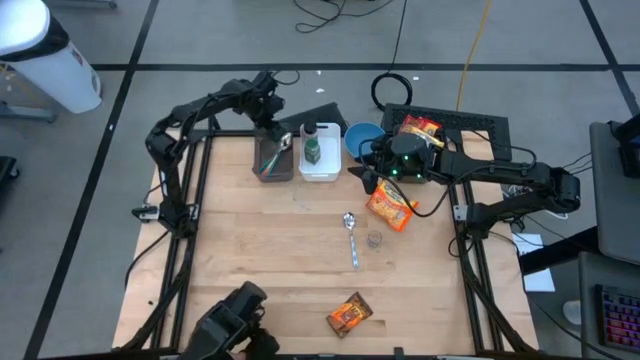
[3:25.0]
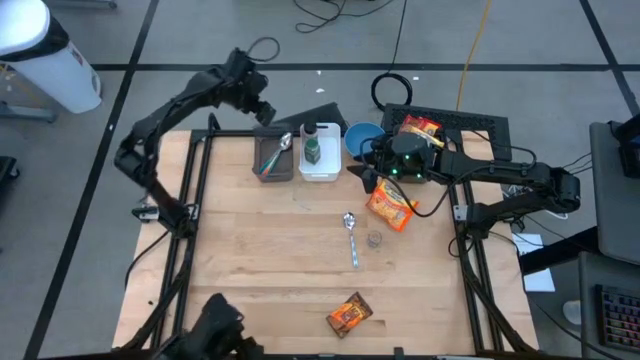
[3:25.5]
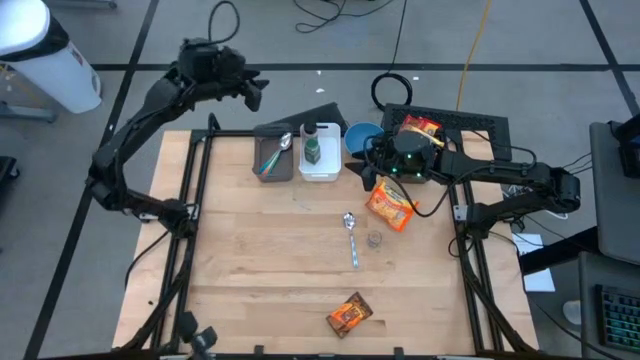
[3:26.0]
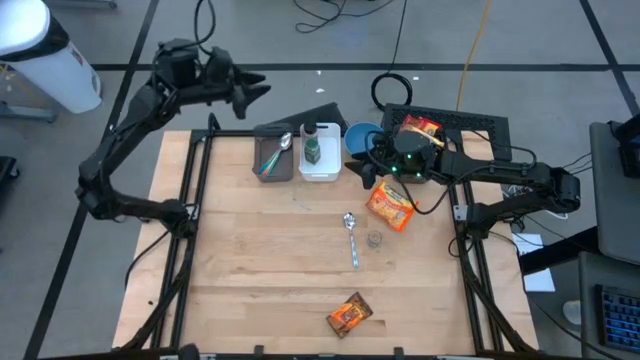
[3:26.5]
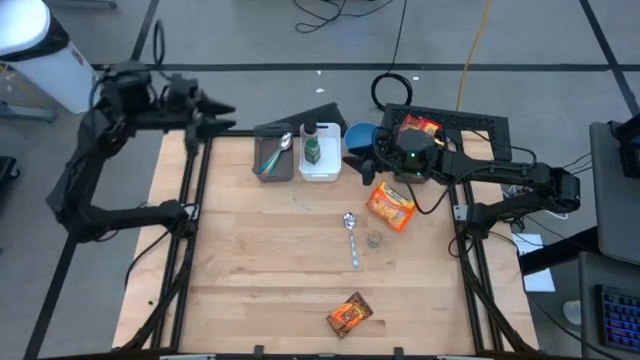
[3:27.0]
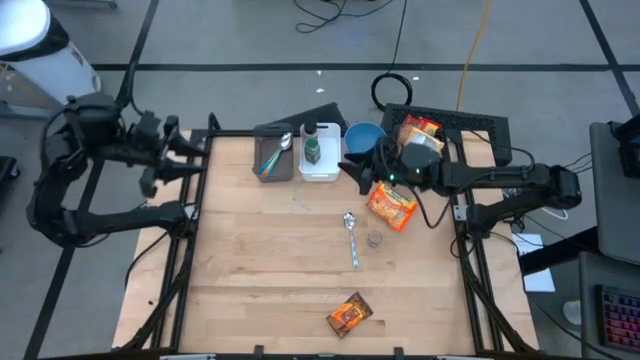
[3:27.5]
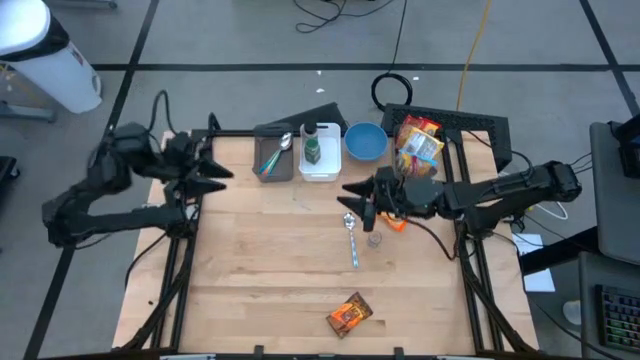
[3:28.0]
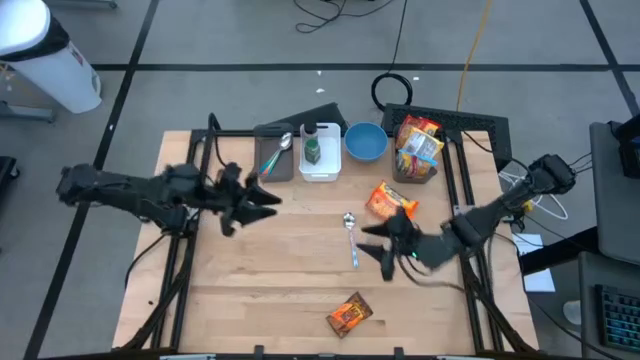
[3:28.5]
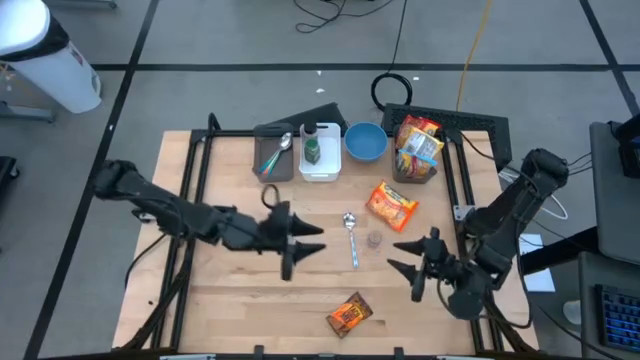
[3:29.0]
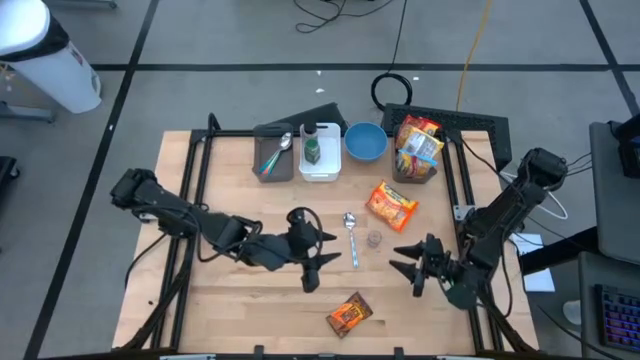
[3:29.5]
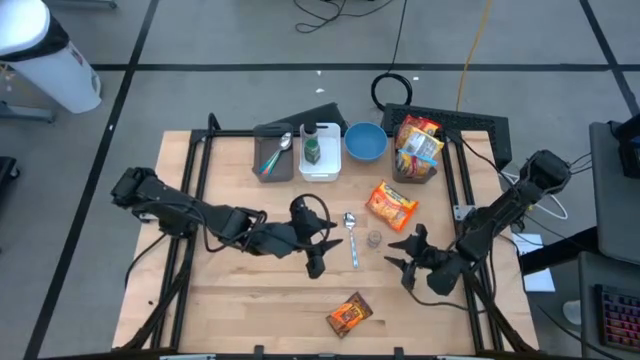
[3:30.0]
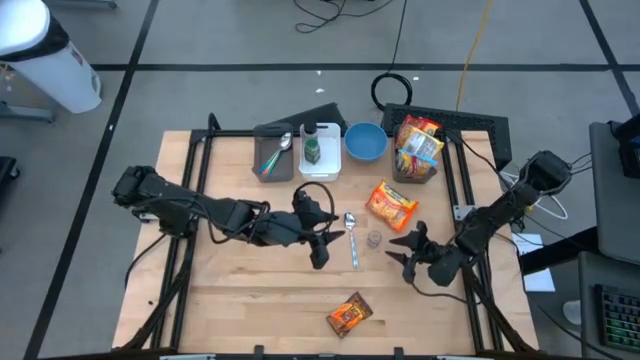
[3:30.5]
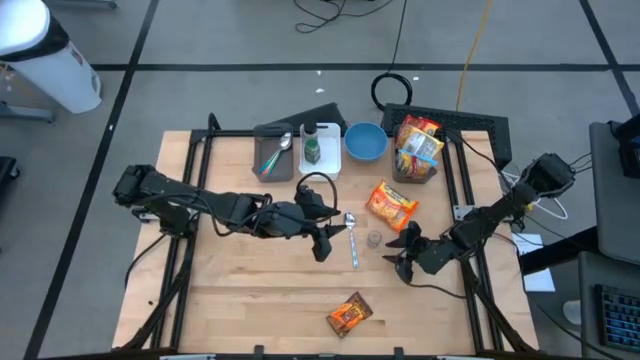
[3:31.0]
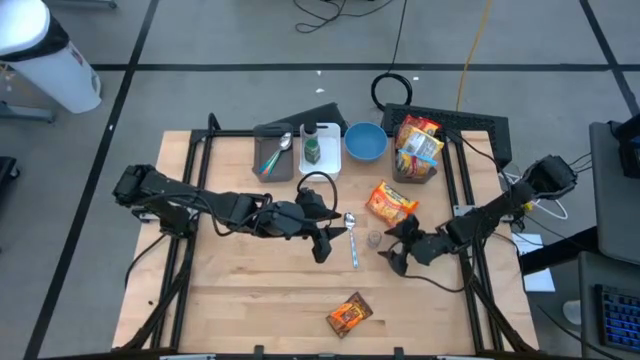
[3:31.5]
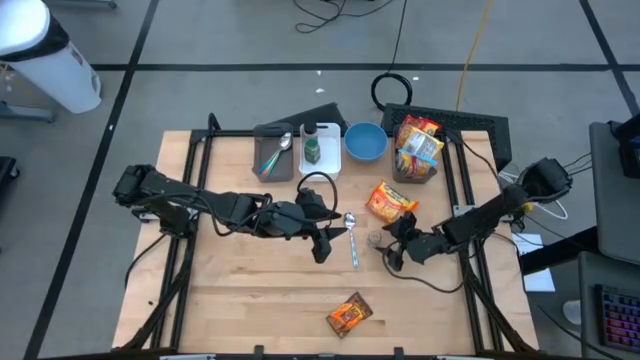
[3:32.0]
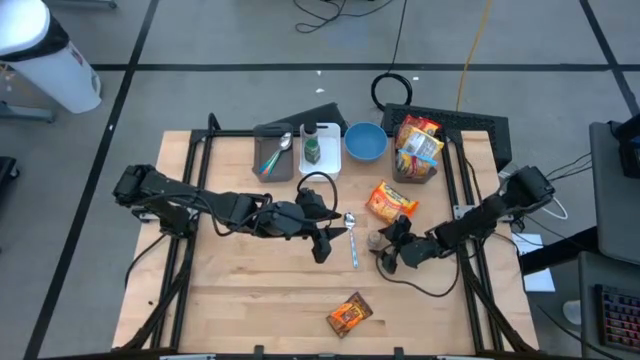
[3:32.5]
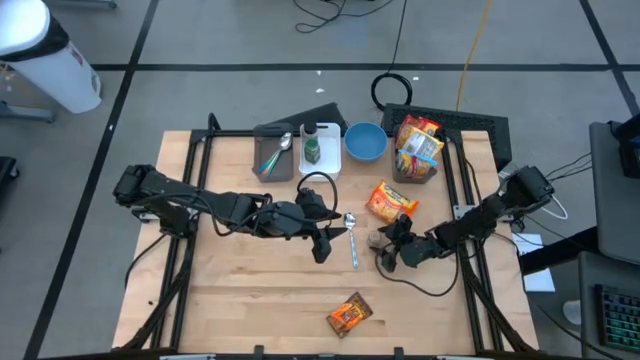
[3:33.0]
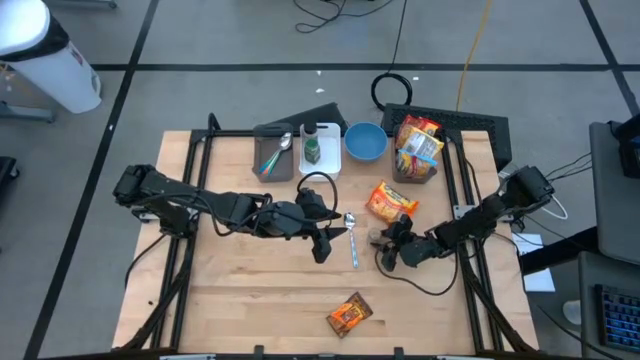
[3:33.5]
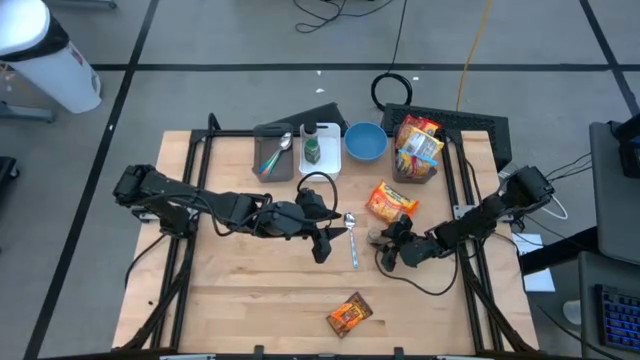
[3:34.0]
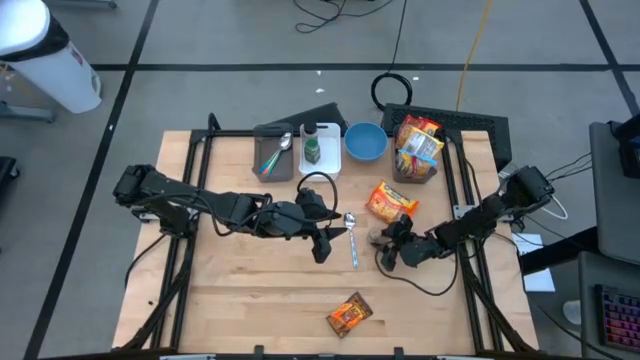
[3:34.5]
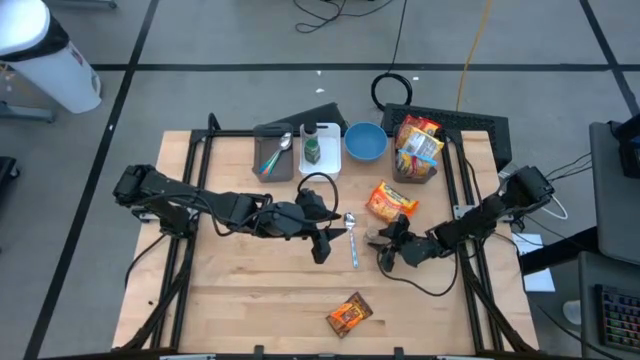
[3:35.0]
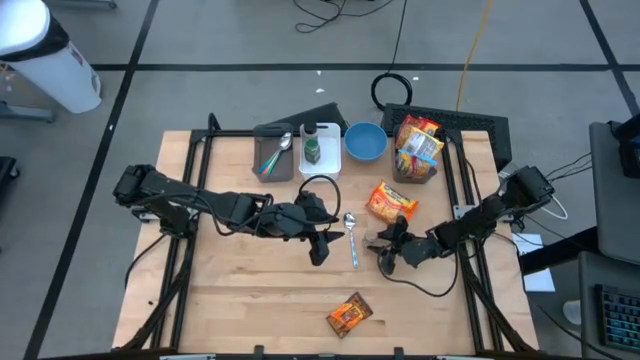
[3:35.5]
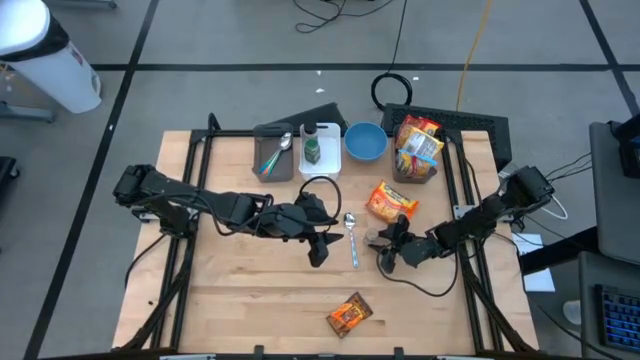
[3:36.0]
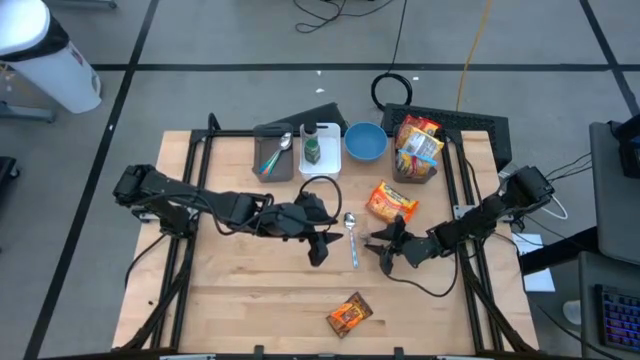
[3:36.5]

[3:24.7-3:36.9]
Task: Pick & Place Food Item
Put the brown seasoning bottle into the white bin

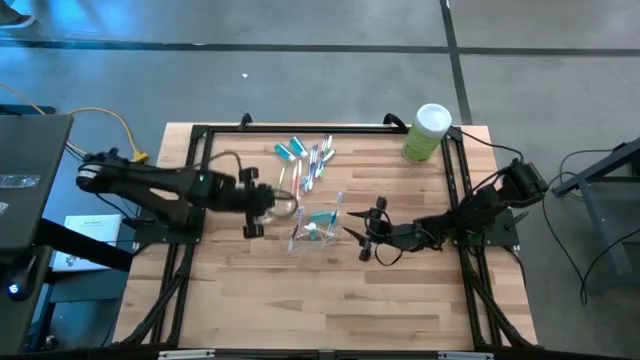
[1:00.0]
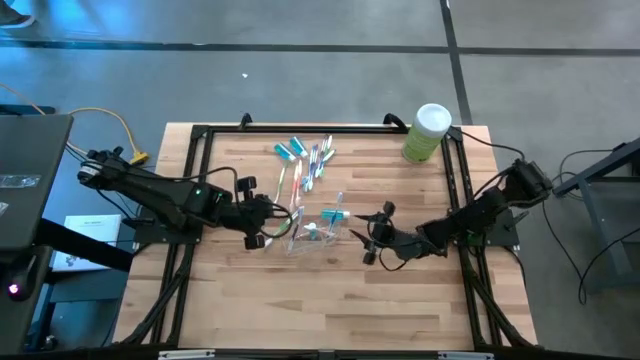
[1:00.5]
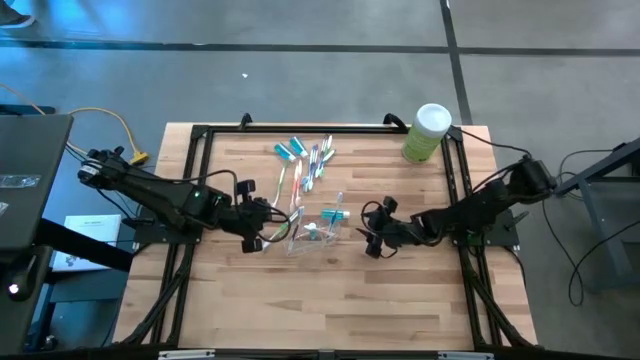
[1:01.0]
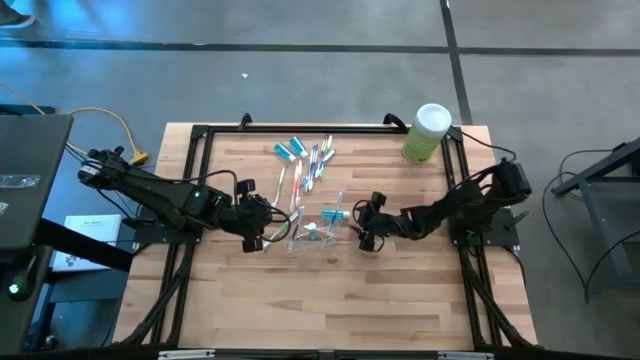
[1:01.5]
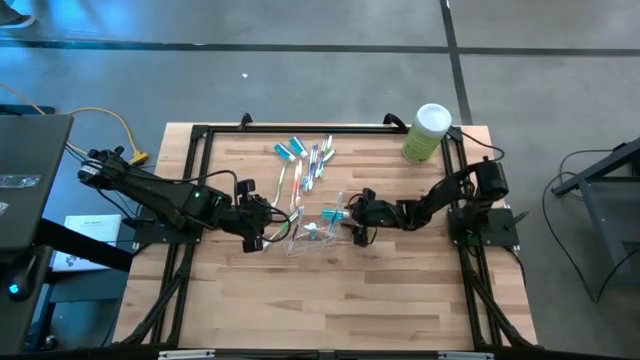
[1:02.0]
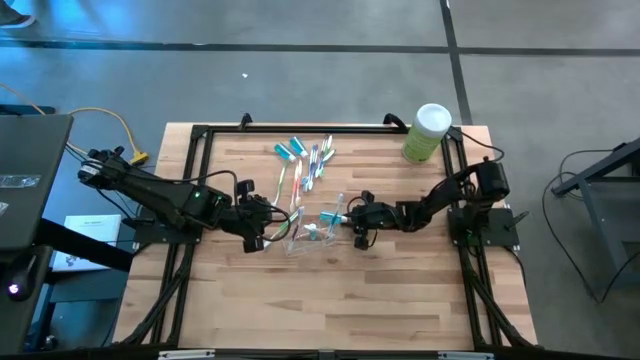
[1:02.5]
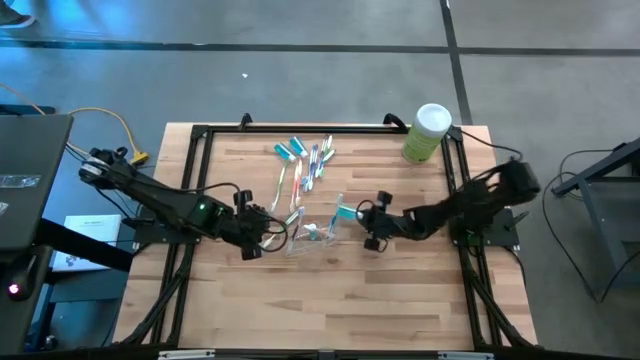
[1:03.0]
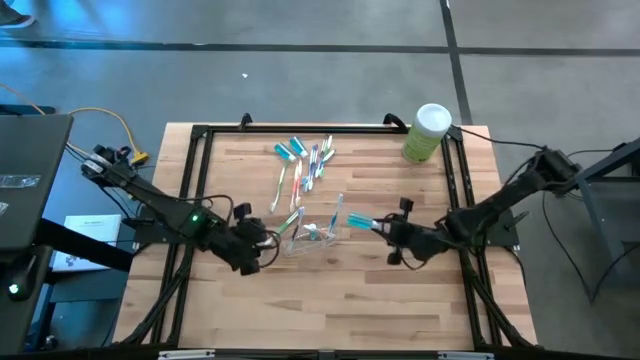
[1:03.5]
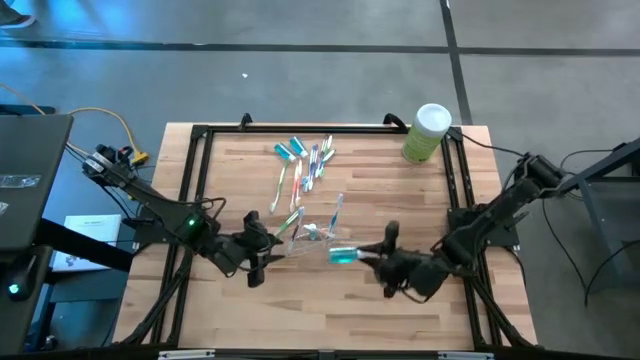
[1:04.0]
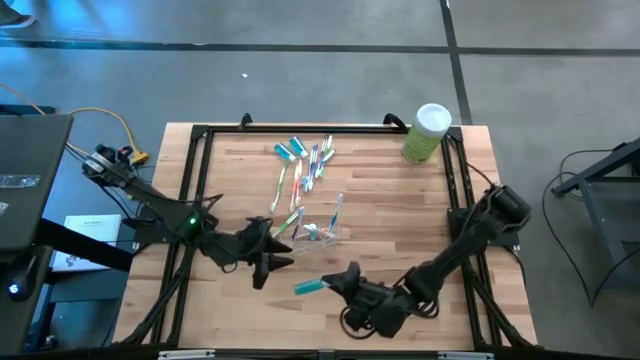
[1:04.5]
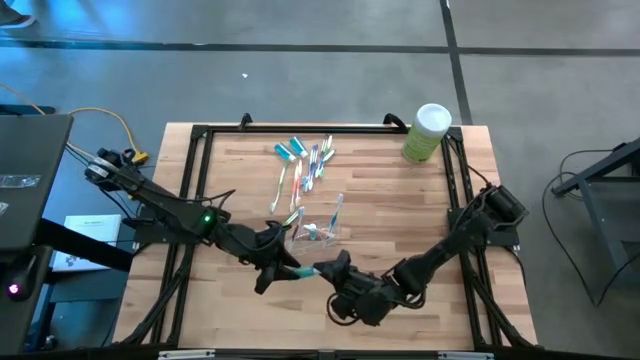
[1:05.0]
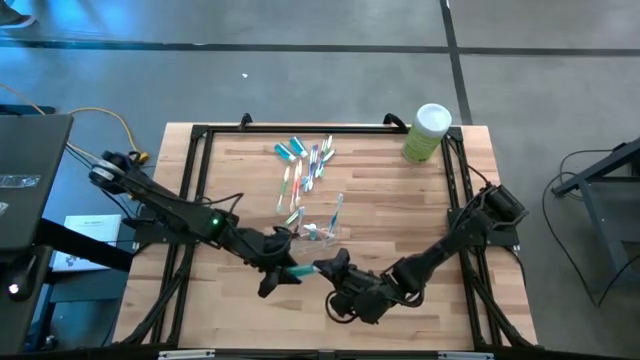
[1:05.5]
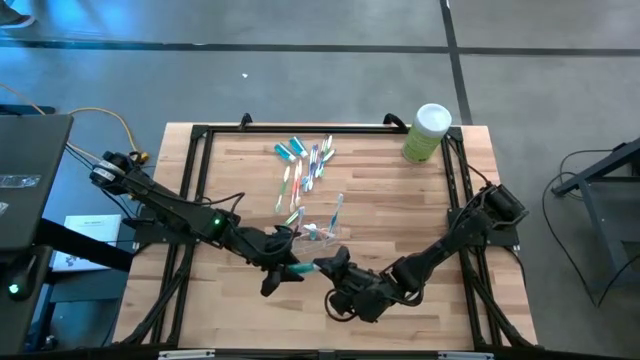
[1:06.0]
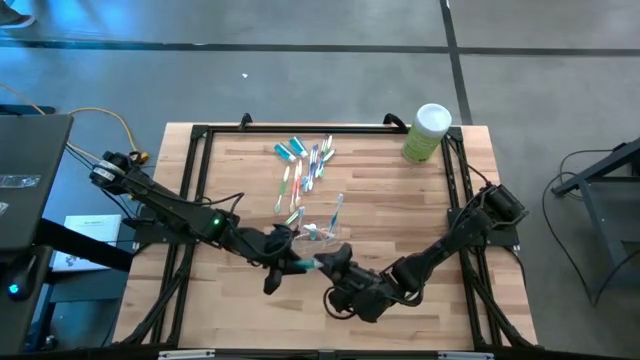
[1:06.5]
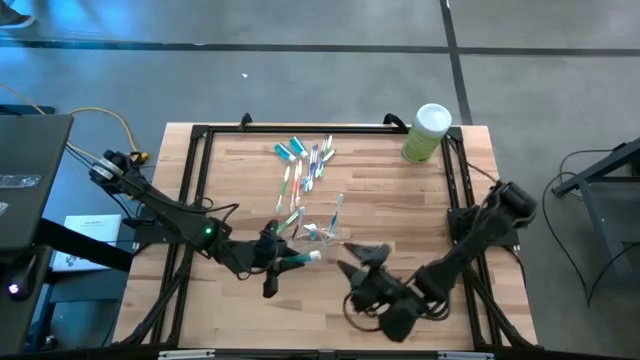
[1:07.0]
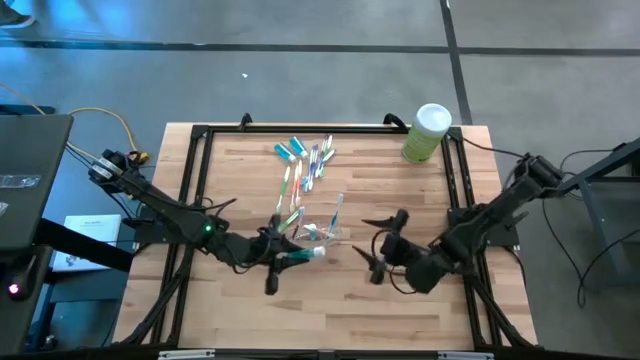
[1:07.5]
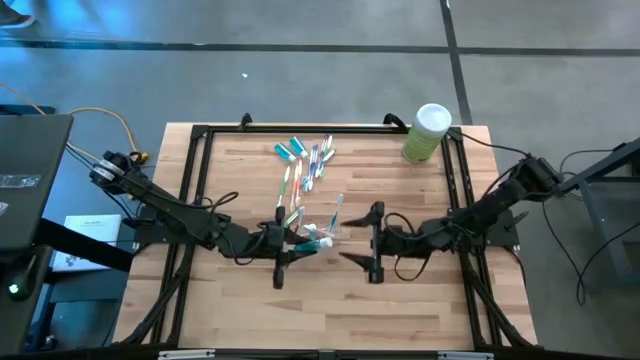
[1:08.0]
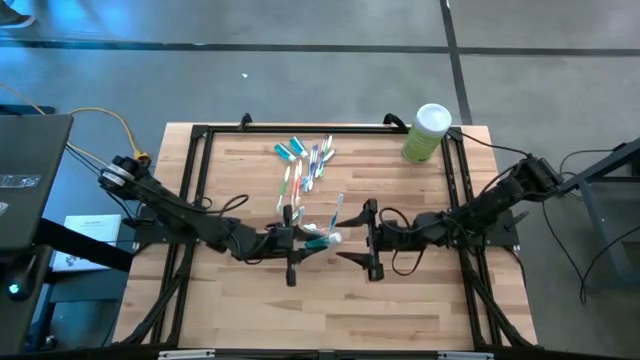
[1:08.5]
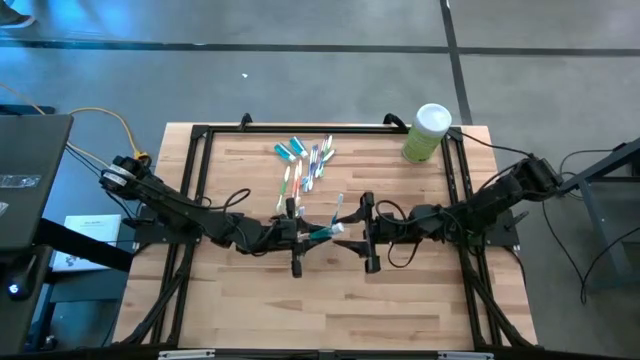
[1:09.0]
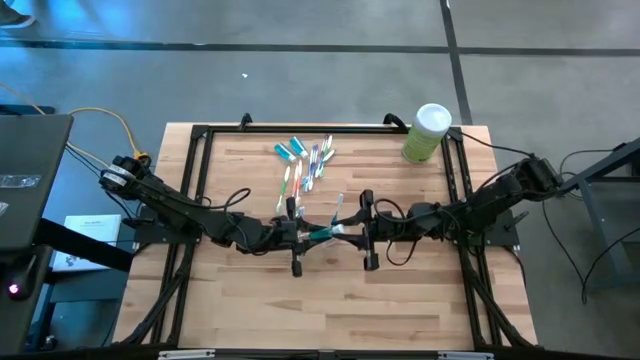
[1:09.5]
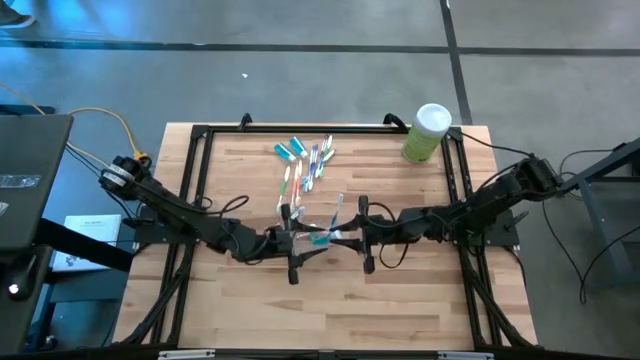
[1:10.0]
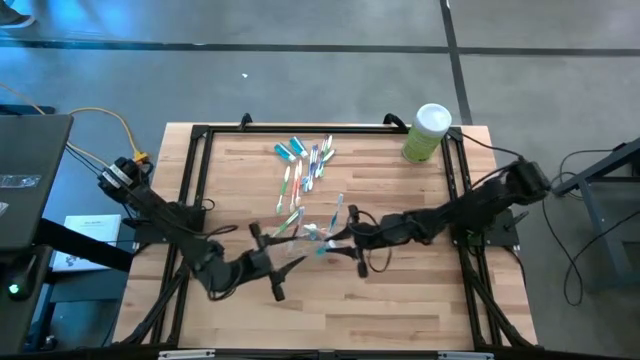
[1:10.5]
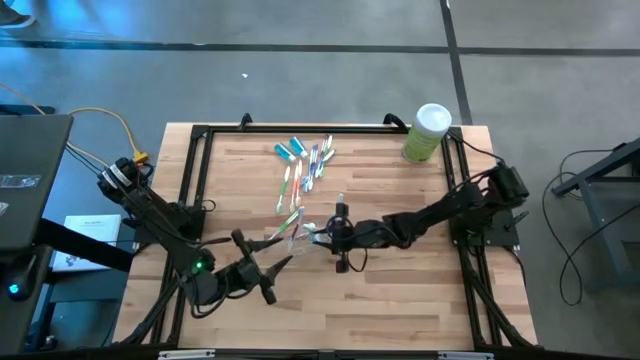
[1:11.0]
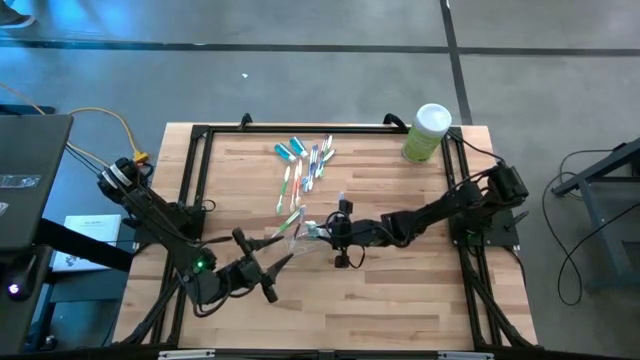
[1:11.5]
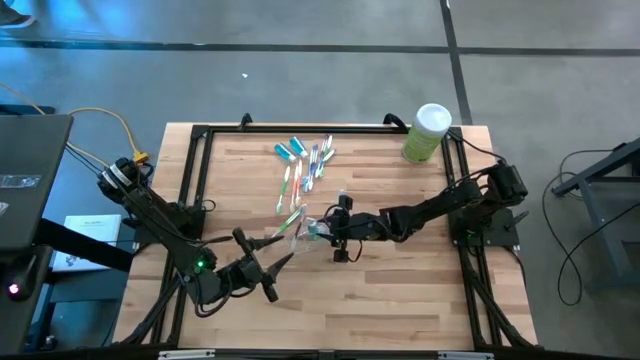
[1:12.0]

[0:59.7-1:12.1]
Task: Pick & Place toothbrushing station
Put the blue mouthwash into the transparent organizer
